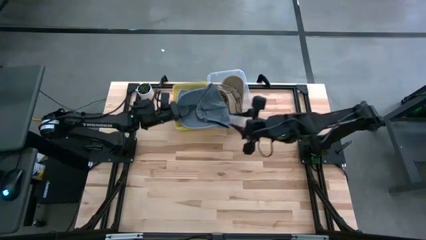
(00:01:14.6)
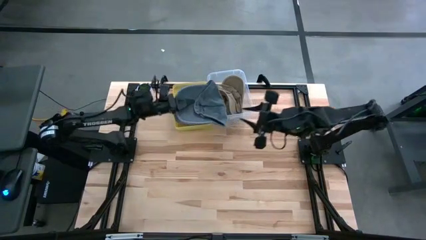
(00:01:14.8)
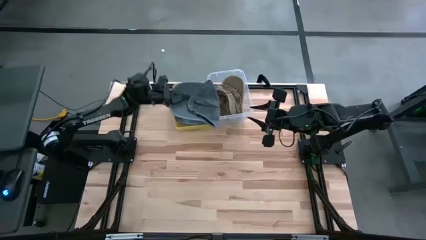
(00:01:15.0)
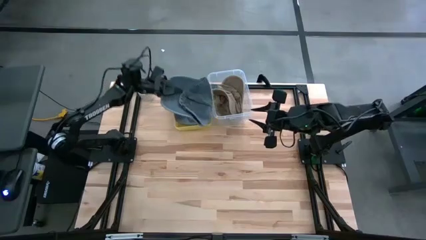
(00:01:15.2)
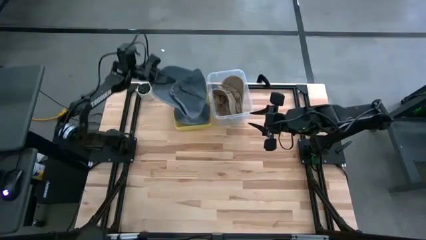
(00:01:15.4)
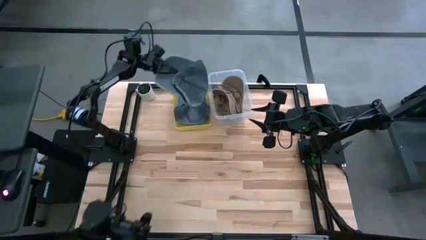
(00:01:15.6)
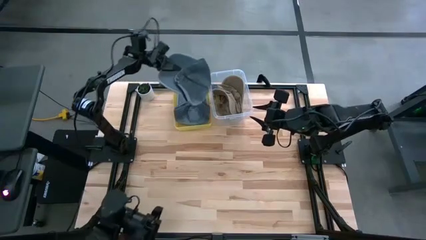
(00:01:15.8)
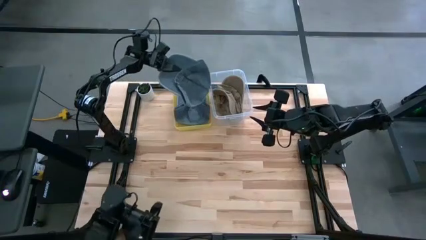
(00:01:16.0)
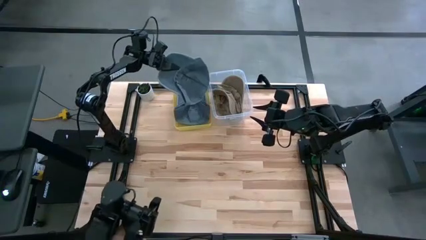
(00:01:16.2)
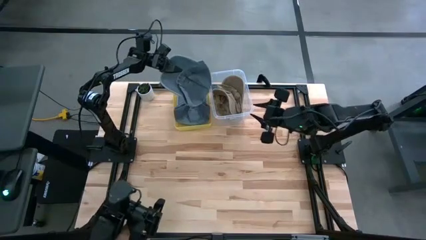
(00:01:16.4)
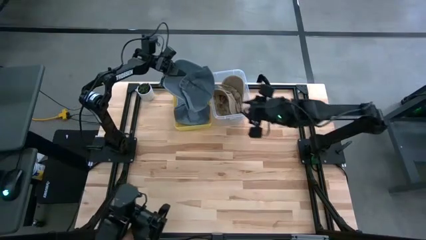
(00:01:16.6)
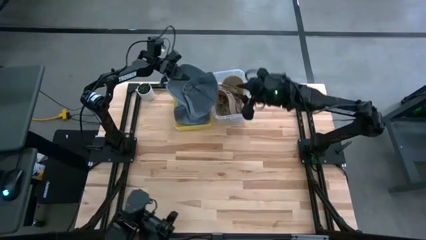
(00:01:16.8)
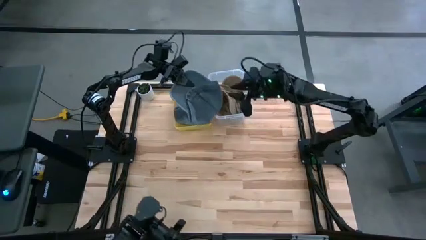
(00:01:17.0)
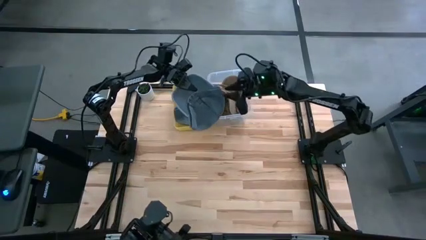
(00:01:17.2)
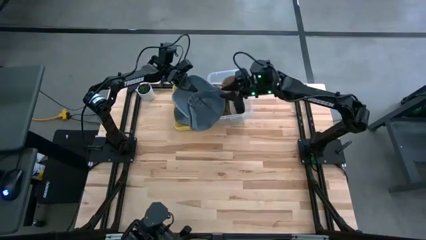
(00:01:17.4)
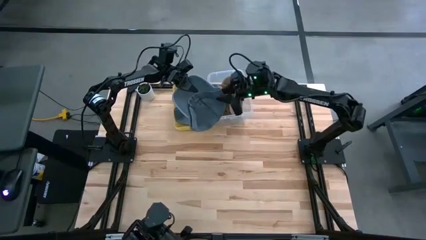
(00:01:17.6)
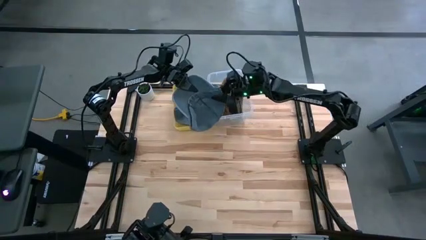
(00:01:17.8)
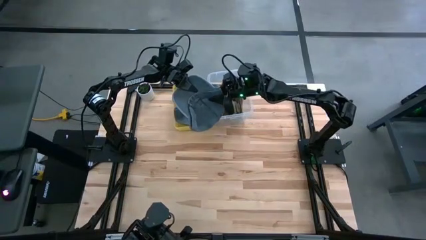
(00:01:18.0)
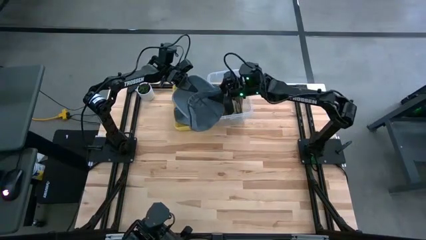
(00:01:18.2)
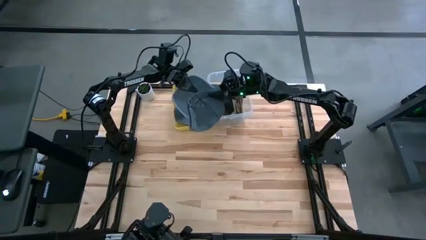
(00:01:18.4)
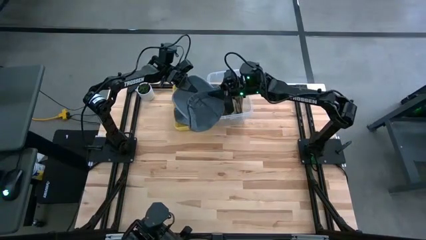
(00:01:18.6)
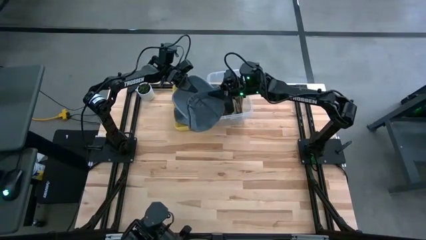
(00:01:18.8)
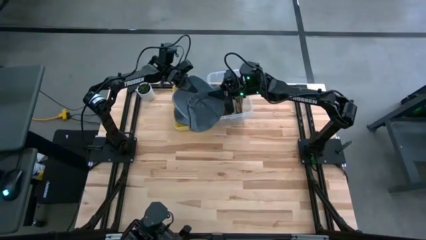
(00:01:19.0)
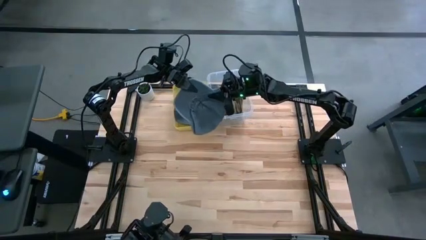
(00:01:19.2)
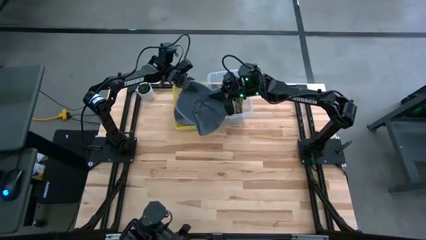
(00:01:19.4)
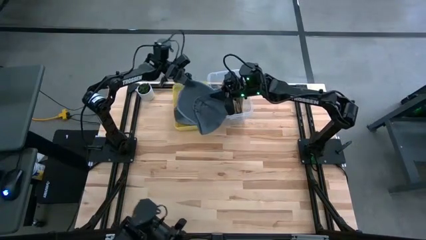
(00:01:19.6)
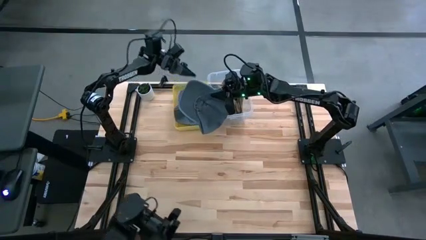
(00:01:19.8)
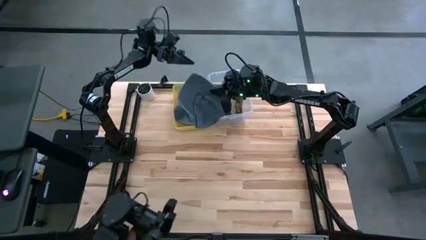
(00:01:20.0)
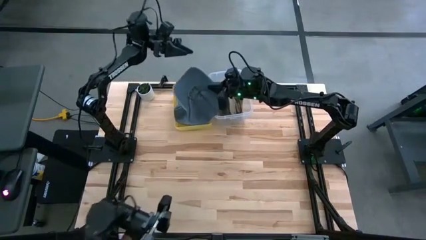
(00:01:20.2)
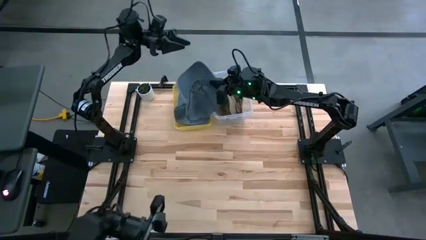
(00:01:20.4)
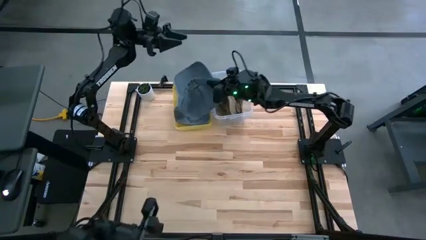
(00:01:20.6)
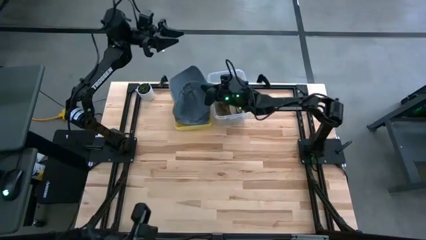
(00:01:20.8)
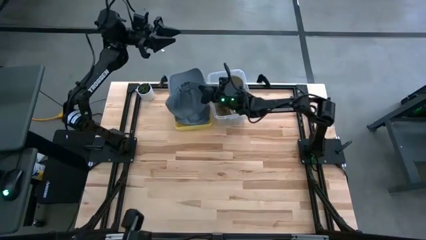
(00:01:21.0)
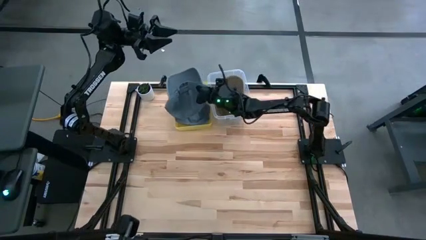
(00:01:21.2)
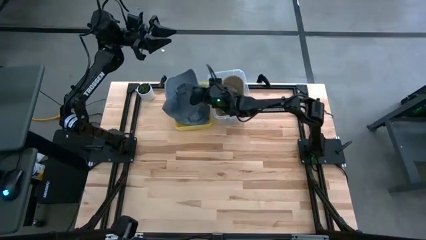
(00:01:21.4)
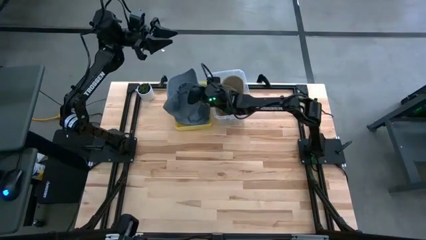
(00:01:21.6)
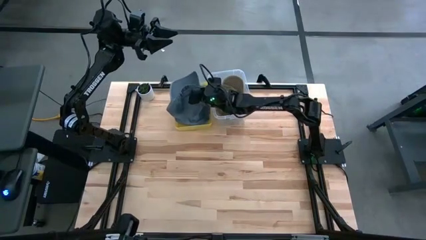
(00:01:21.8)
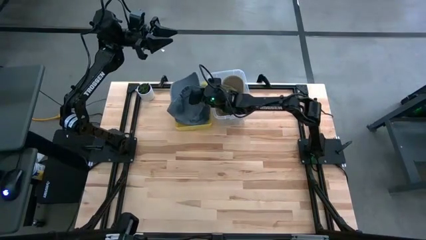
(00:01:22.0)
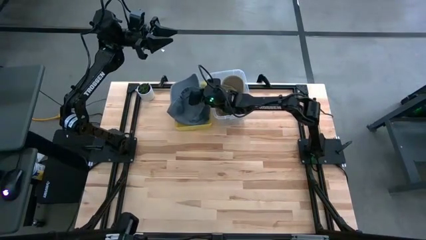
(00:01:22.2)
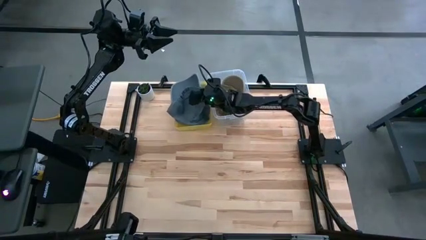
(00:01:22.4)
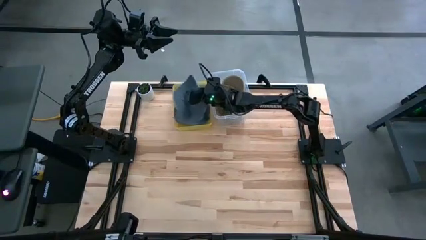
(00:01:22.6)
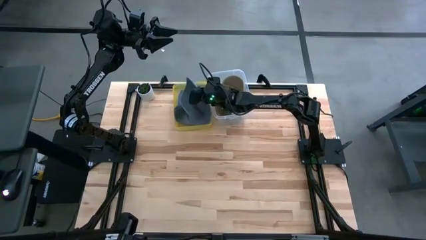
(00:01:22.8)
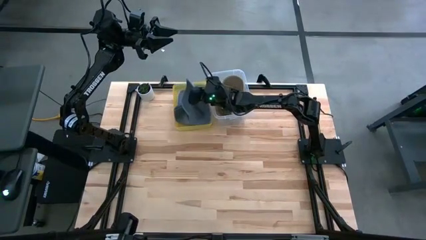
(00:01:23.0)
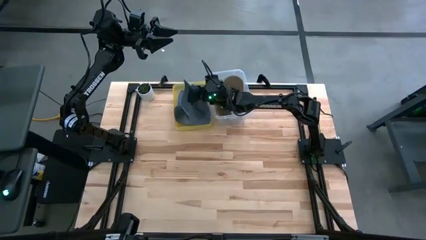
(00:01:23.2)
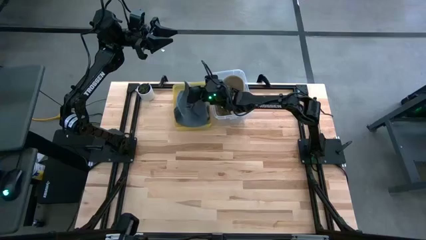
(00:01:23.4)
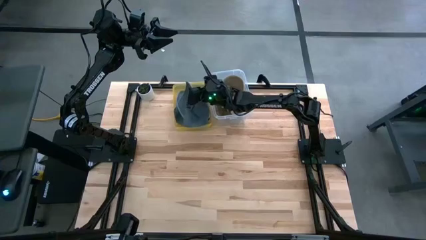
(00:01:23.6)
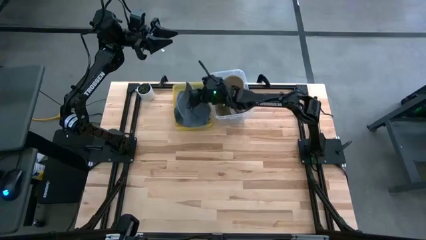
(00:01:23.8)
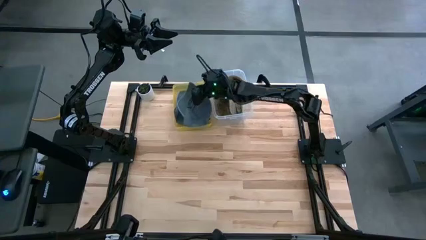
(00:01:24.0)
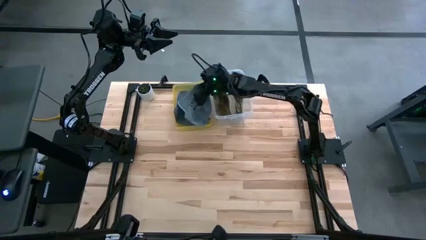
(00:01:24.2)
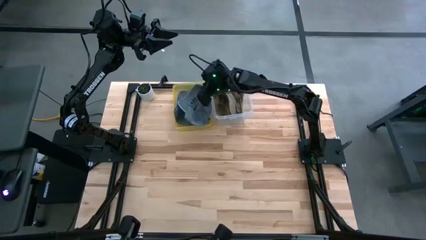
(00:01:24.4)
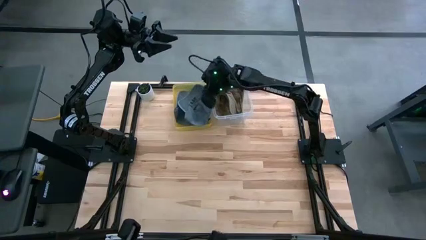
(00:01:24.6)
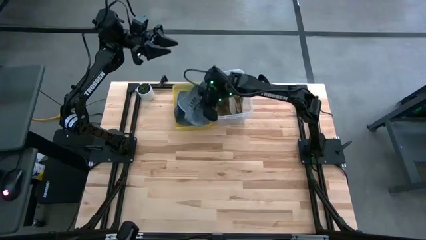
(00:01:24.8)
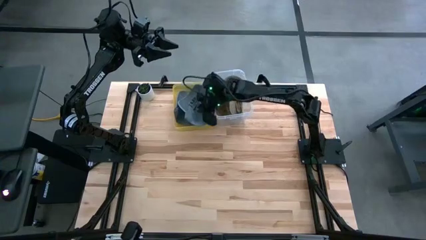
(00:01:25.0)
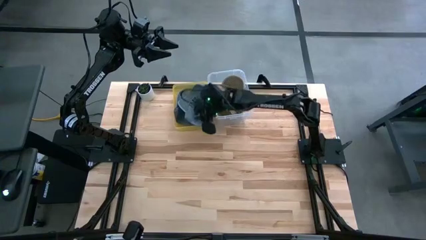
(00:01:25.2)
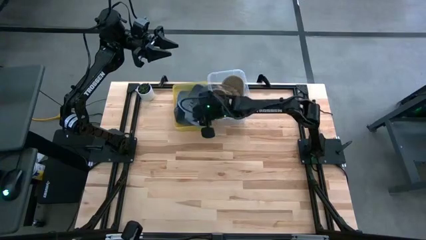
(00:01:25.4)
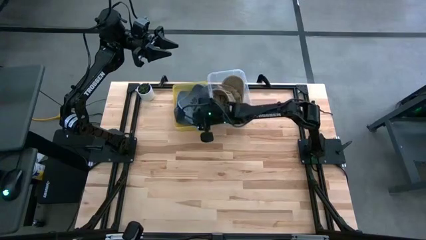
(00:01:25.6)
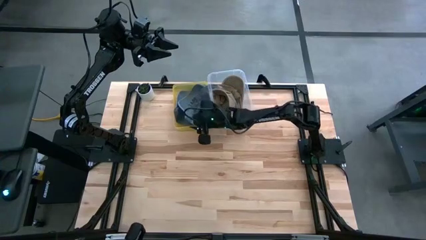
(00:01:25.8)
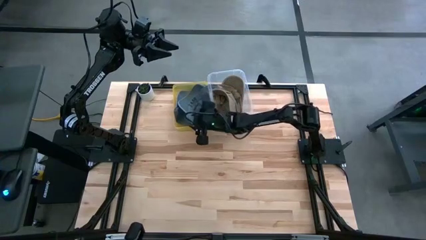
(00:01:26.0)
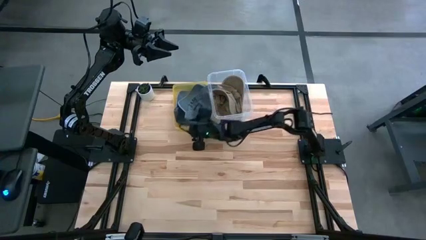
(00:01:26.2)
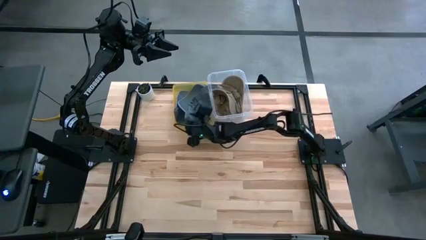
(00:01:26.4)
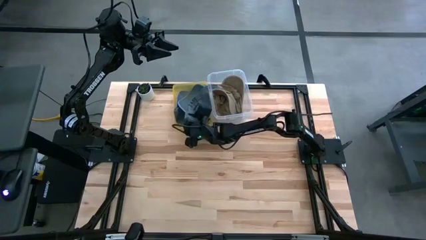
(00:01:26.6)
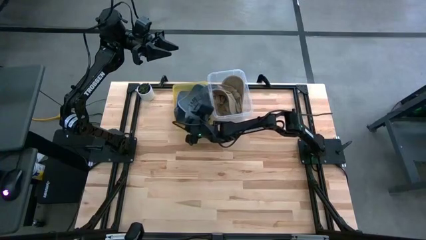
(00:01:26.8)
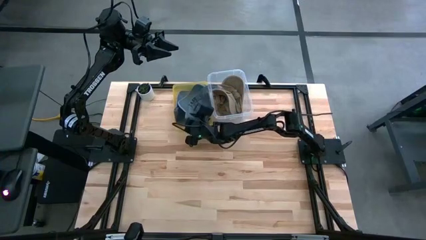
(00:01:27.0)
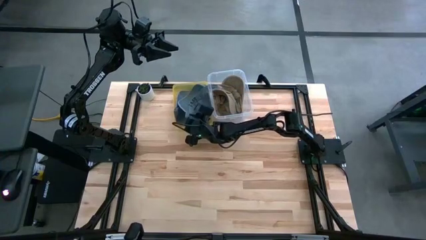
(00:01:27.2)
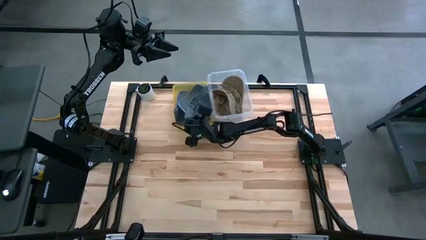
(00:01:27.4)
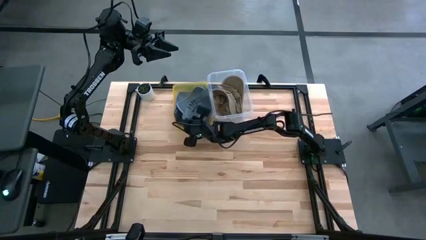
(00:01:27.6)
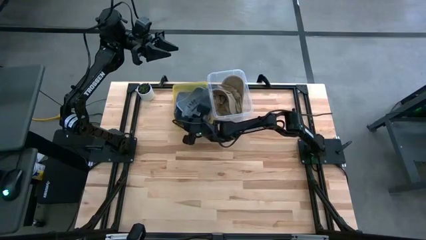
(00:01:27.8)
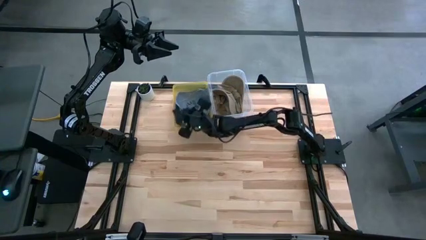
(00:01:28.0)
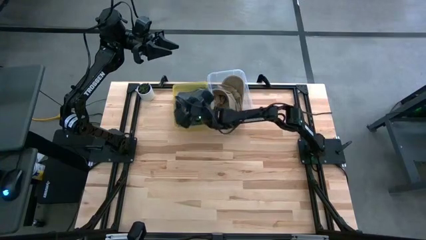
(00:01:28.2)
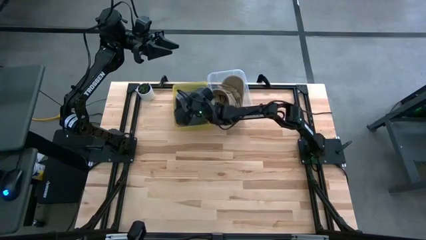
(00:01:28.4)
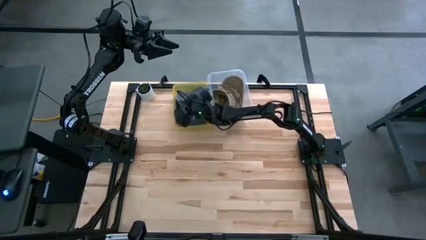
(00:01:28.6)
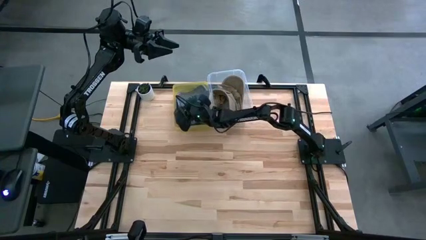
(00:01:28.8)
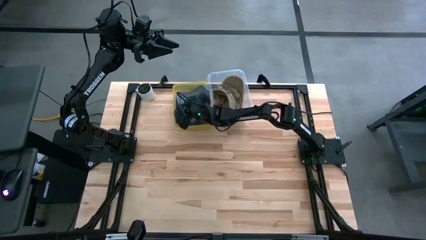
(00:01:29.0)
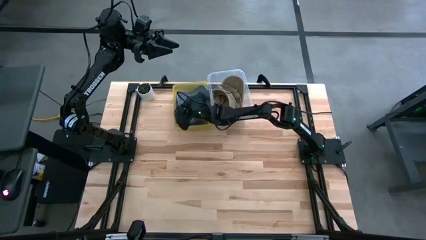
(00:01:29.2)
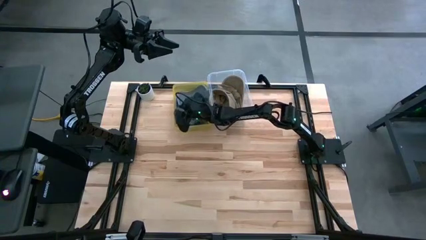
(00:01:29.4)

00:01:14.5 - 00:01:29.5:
Task: Pick & Place hat
Put the blue cap into the yellow bin
